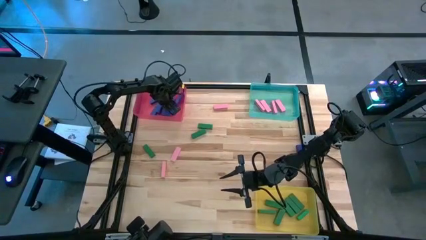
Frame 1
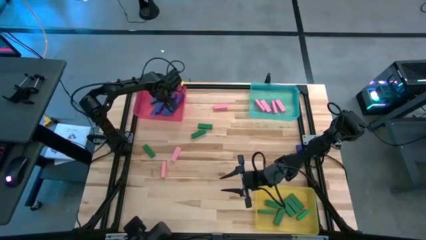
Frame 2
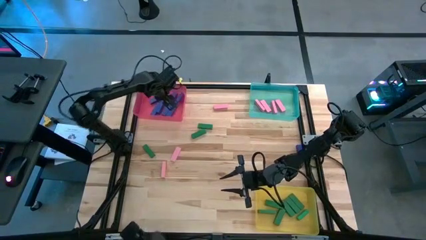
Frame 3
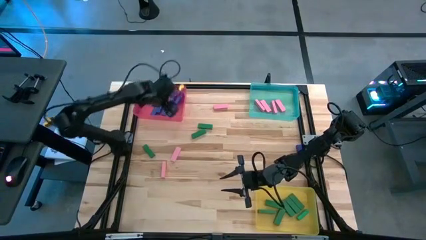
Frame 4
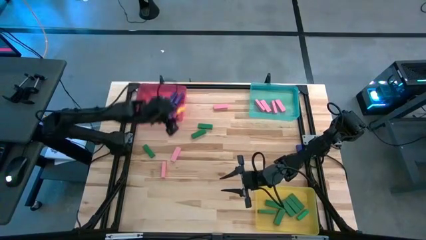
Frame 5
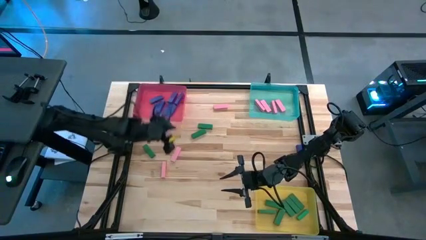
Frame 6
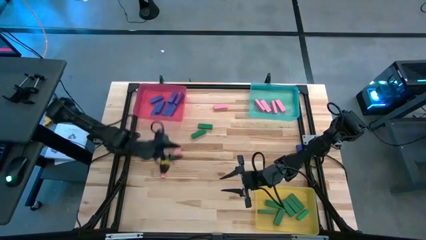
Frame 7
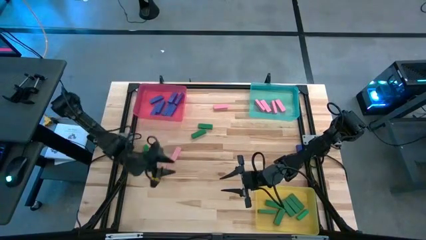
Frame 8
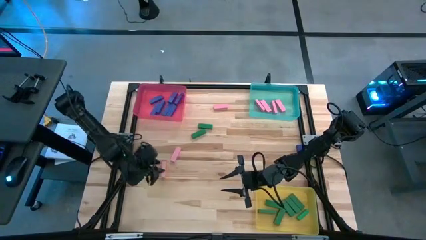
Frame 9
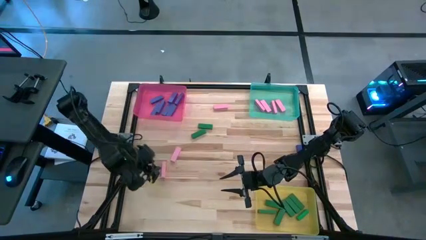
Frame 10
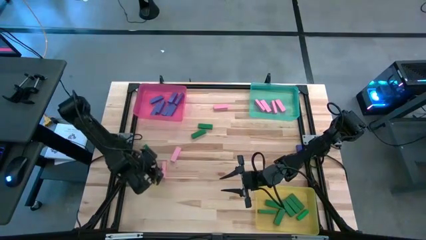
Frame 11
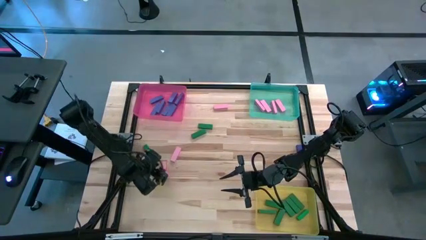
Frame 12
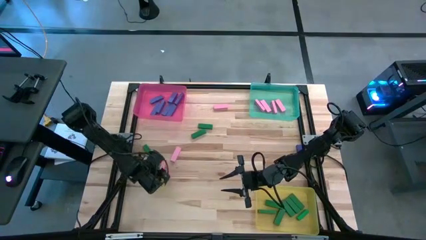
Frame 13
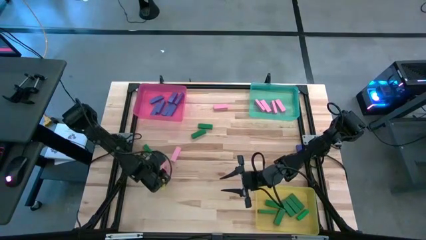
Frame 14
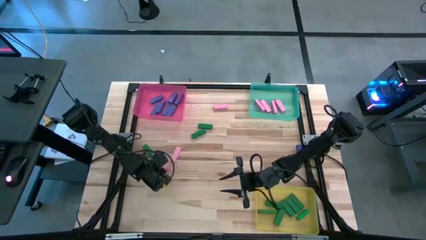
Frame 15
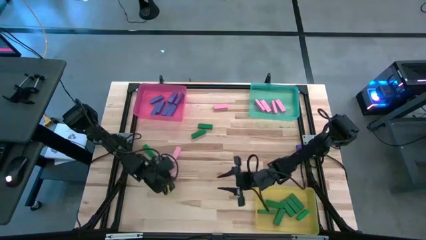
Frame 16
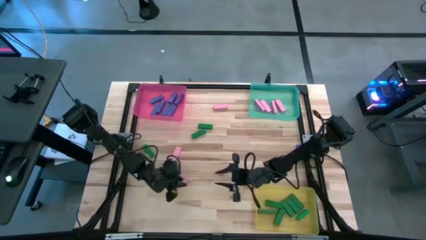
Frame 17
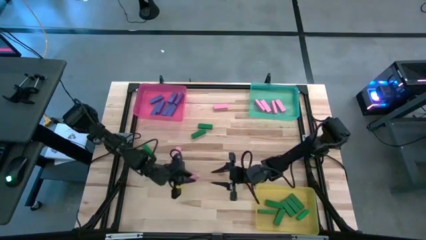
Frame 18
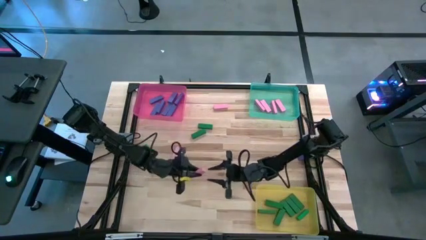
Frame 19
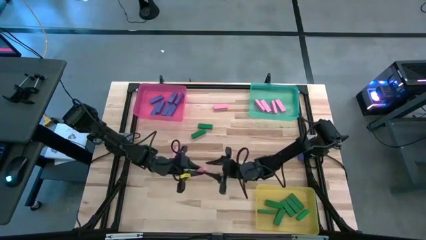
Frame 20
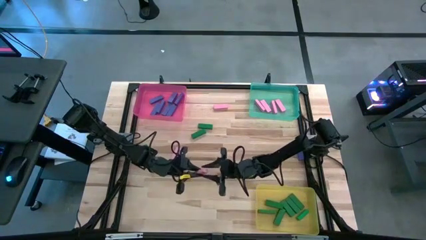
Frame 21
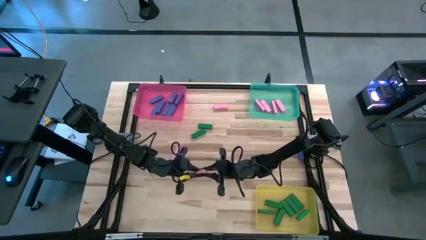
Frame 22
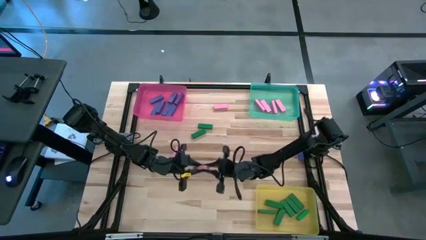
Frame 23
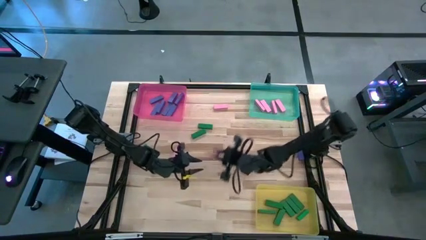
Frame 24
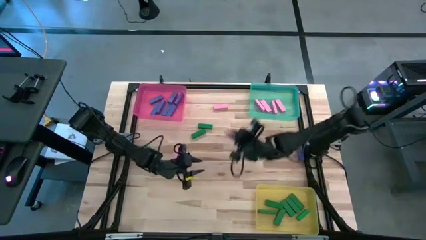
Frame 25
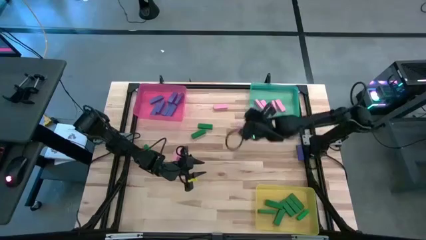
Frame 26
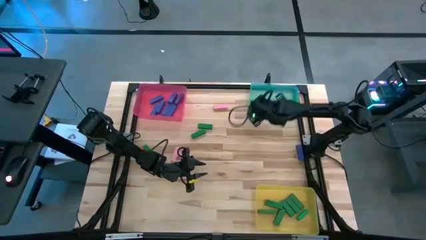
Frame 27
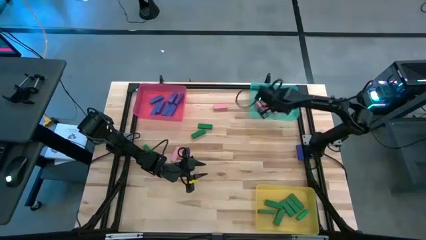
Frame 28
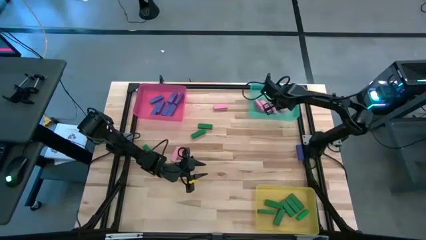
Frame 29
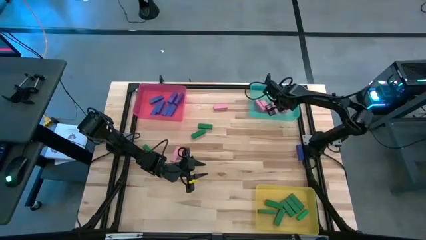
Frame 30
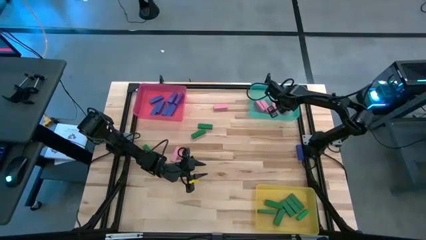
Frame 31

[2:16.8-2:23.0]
Task: Sort blocks
Put the pink block into the blue bin

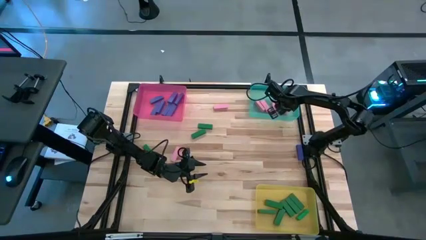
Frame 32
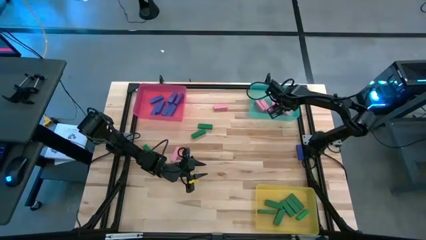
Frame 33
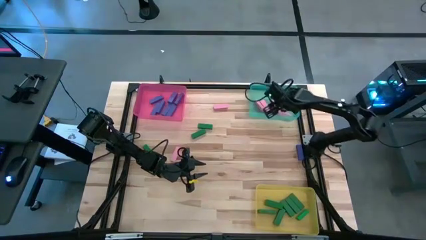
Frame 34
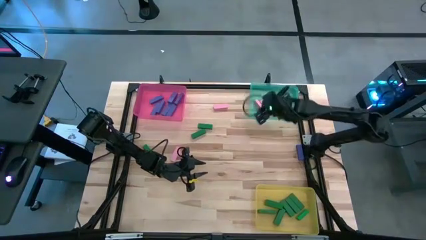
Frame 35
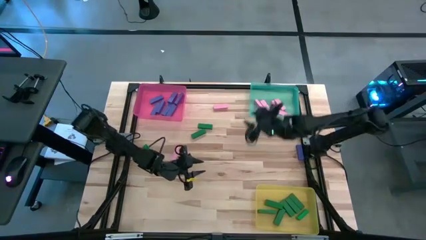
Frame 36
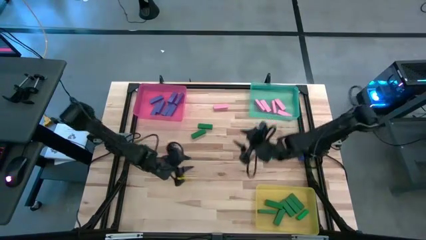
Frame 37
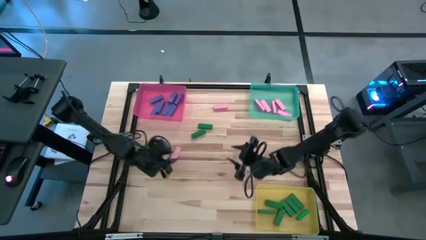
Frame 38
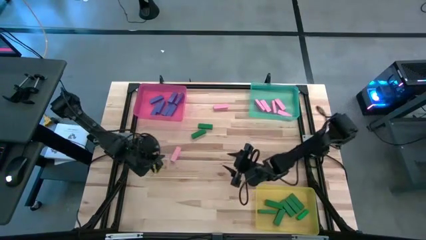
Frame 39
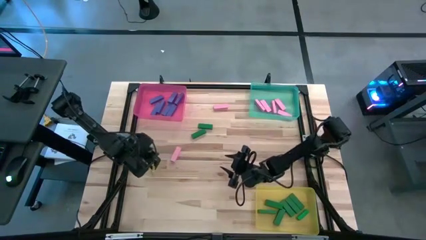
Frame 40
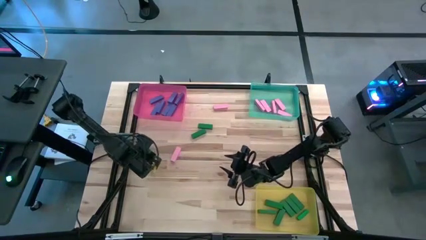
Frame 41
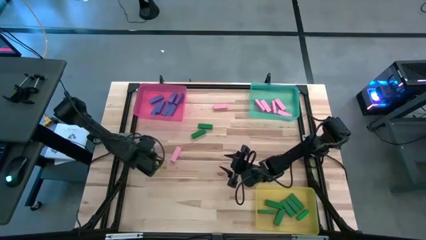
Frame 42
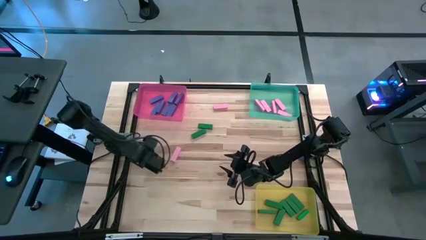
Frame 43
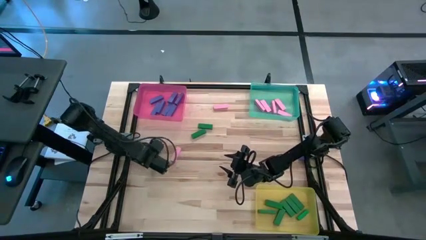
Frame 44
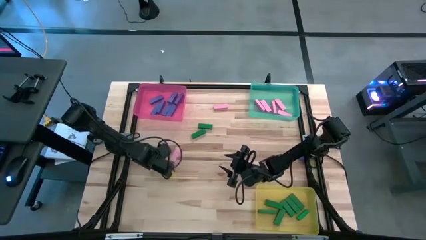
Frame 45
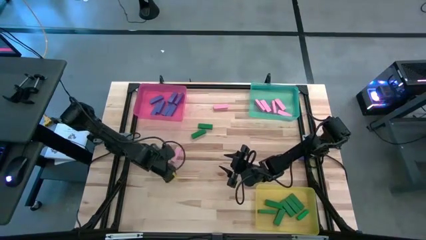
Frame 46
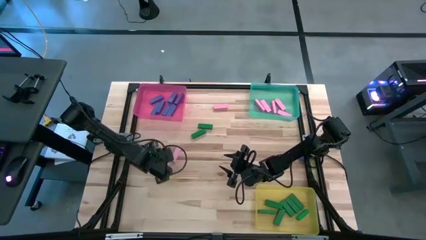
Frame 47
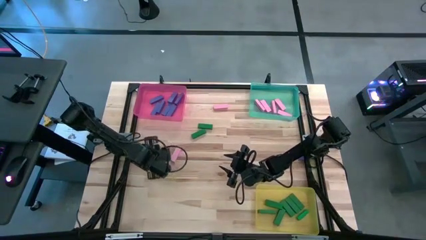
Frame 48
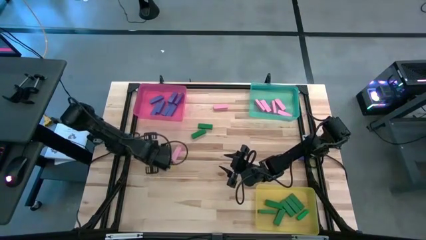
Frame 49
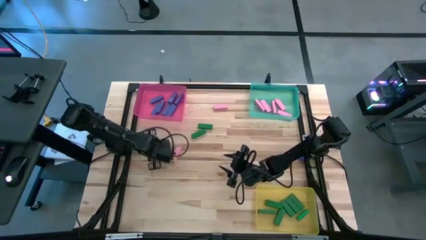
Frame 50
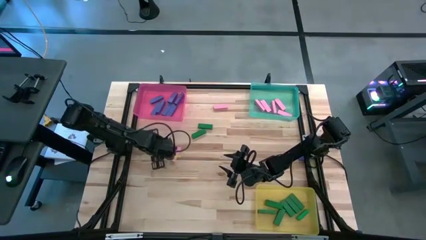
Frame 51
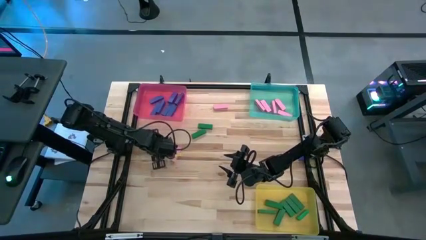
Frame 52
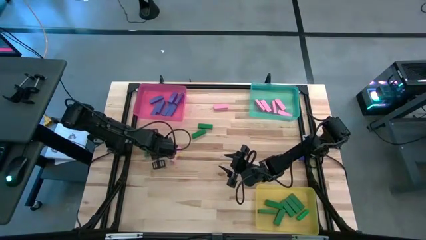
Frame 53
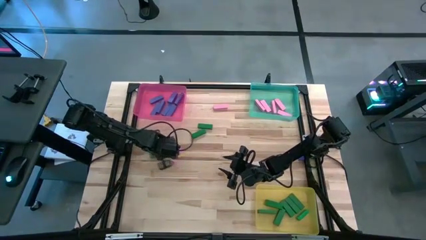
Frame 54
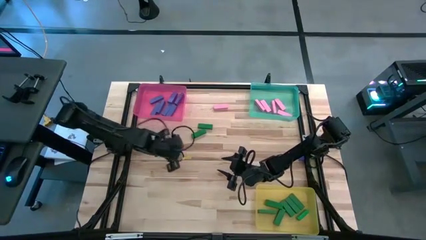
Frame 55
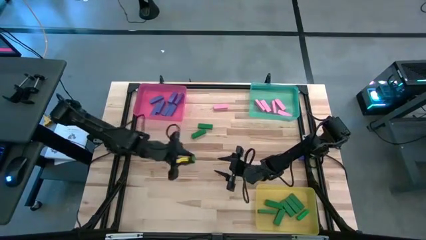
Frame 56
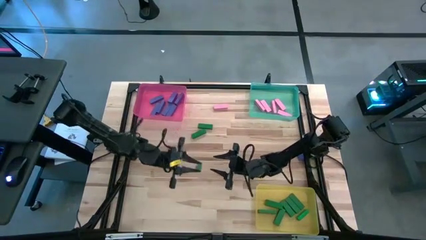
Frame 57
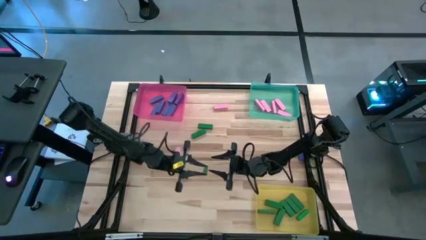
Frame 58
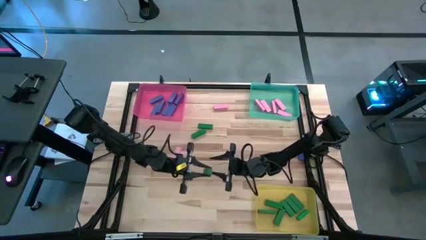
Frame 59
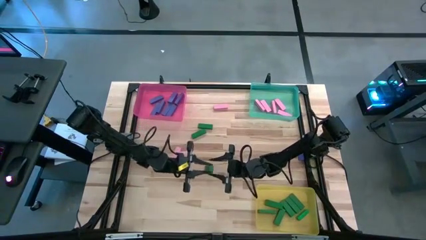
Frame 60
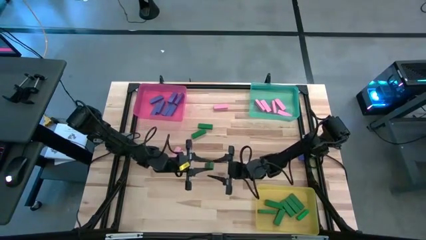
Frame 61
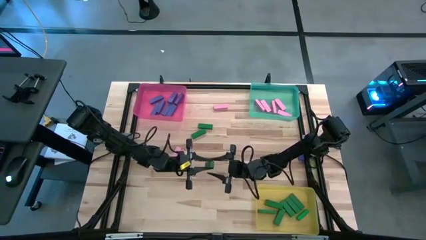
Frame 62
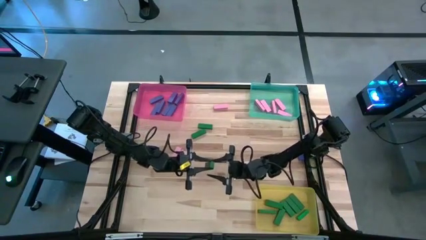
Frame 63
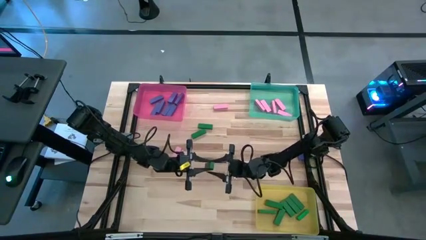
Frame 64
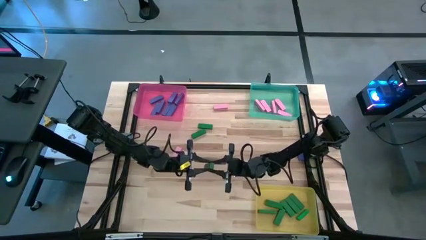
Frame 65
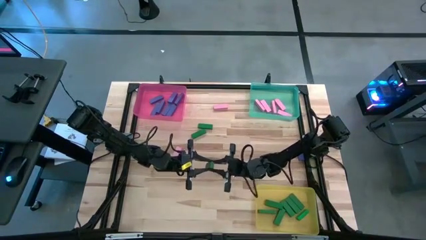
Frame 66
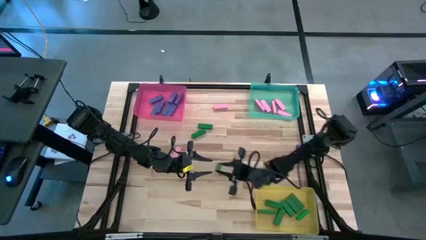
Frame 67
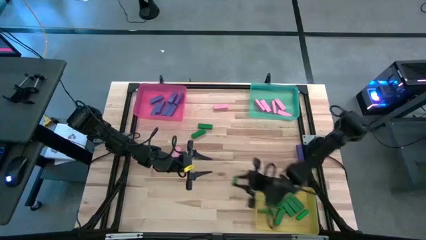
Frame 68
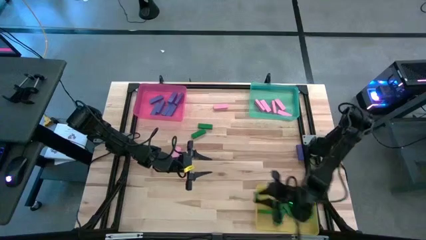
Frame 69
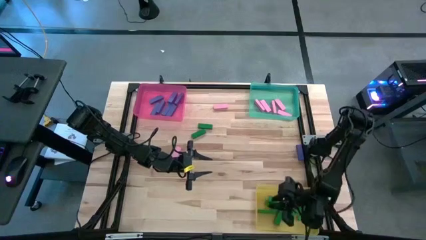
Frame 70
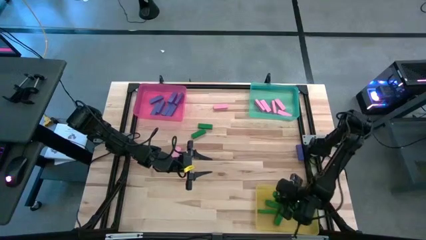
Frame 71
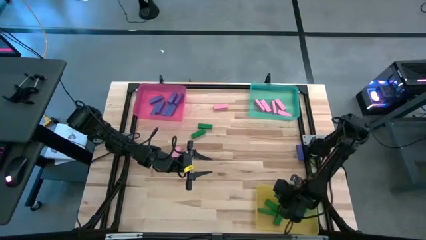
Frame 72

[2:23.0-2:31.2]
Put the green block into the yellow bin

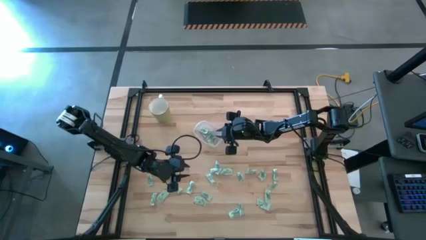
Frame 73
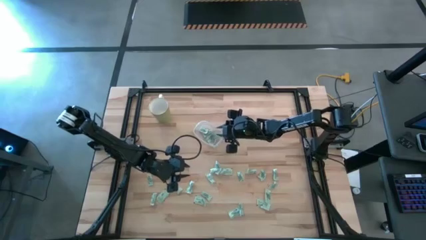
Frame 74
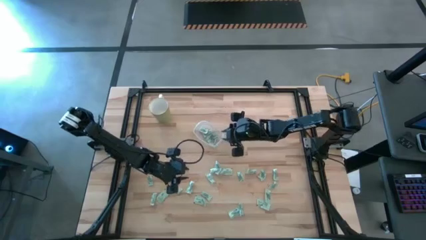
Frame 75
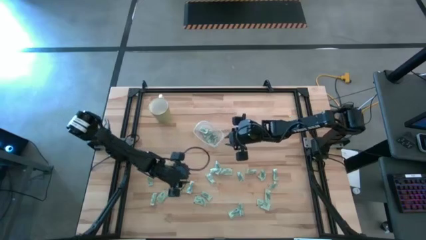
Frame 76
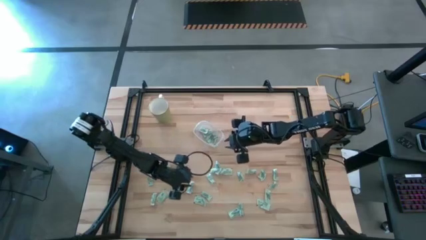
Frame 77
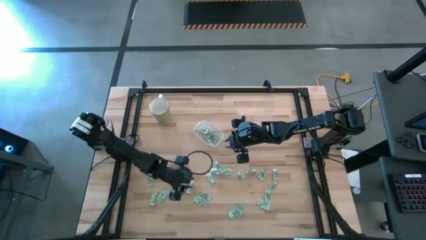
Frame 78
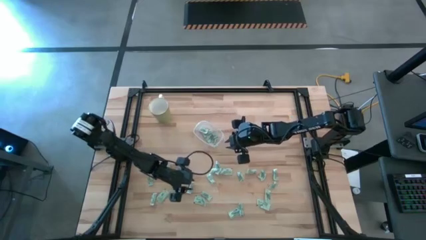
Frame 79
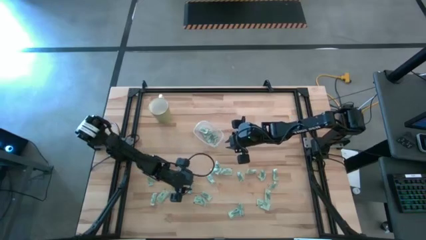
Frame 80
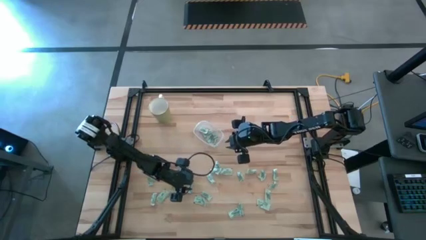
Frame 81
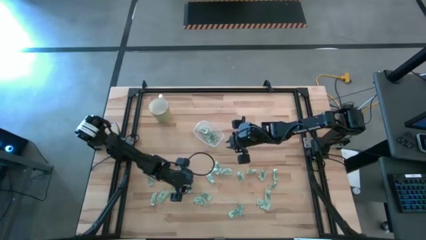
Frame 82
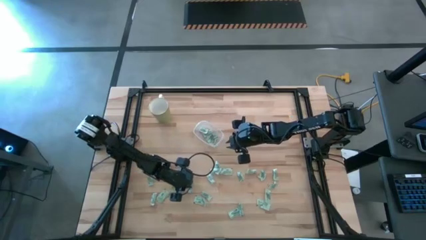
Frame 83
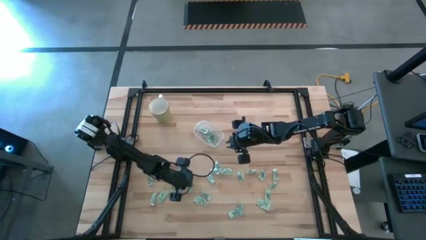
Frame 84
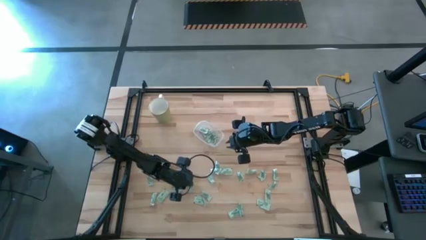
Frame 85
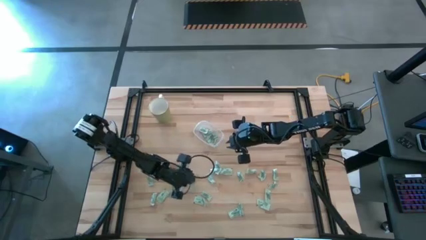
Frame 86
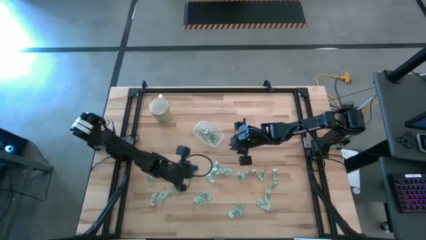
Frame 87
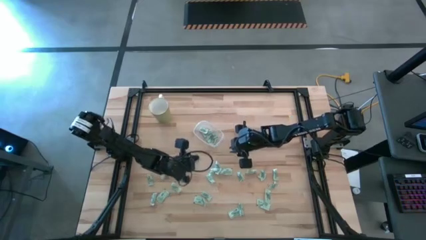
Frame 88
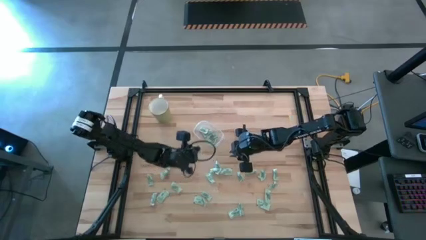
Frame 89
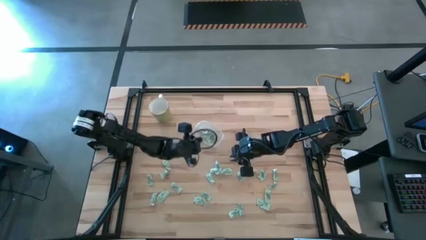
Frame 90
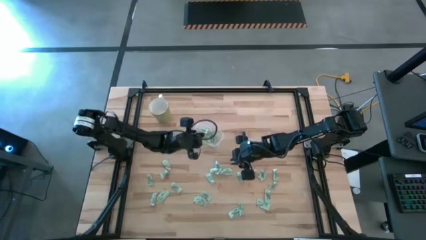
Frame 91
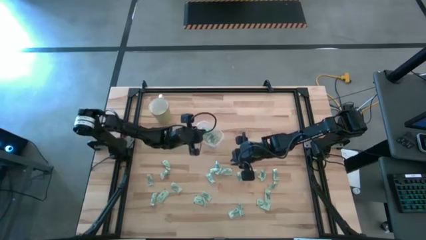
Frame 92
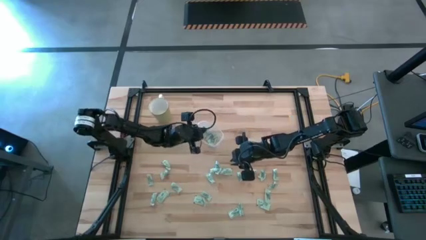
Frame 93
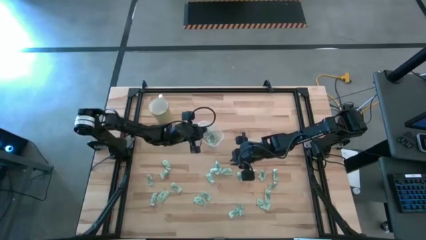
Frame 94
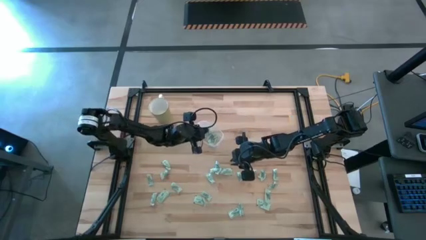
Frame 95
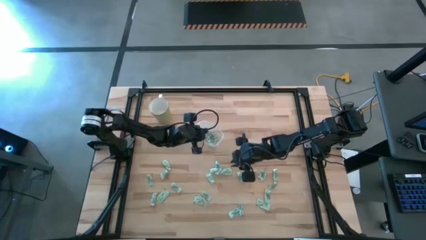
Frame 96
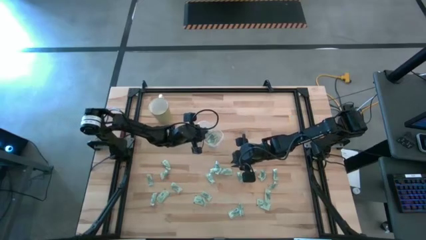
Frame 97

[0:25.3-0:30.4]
Task: Pick and place Stevia / Truvia into bins
Put the stevia packet into the transparent container
